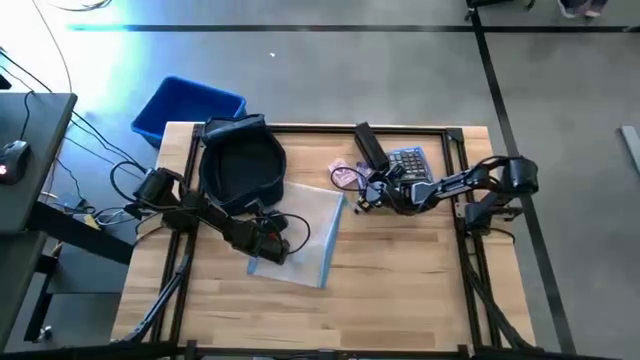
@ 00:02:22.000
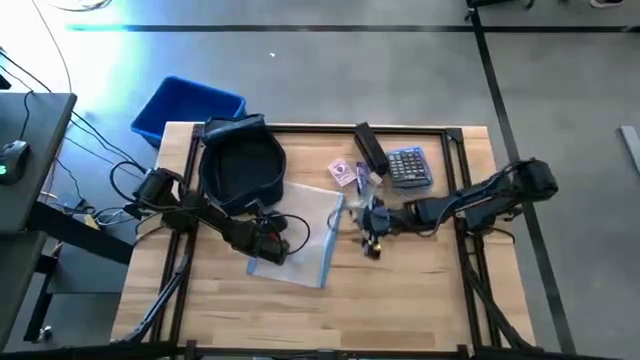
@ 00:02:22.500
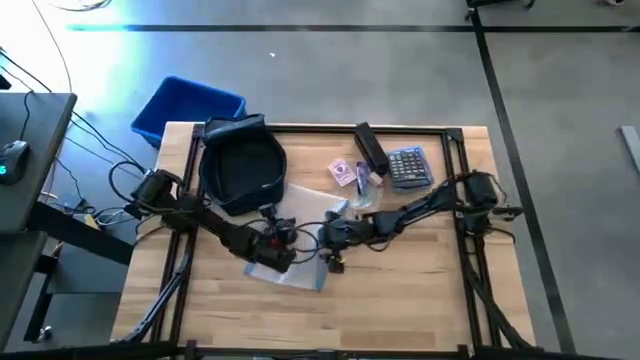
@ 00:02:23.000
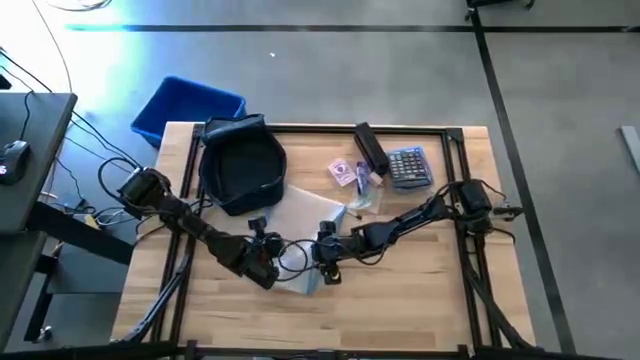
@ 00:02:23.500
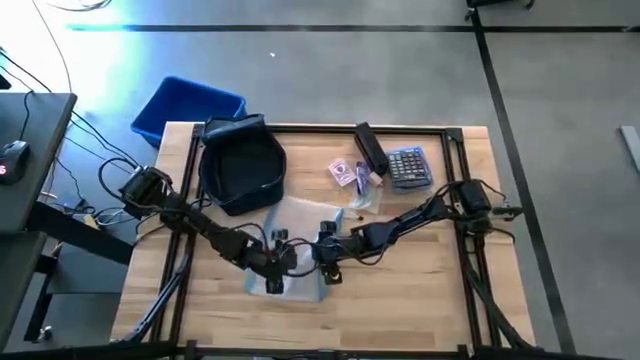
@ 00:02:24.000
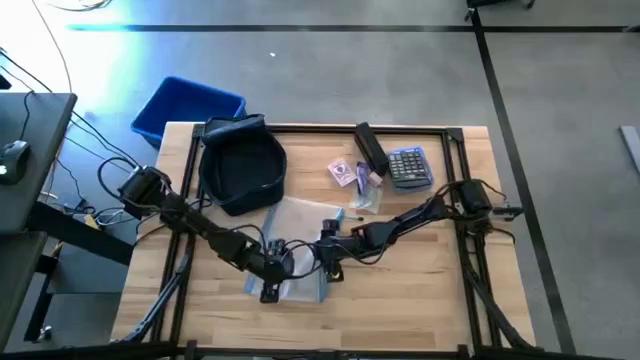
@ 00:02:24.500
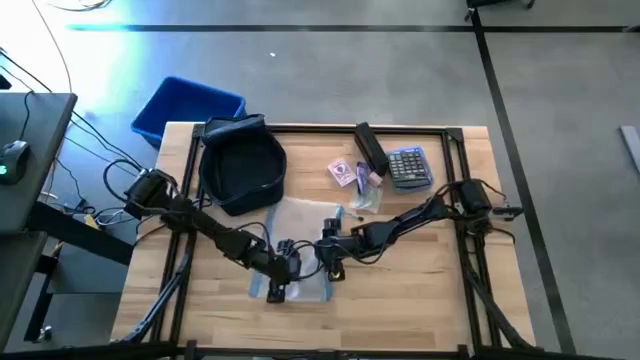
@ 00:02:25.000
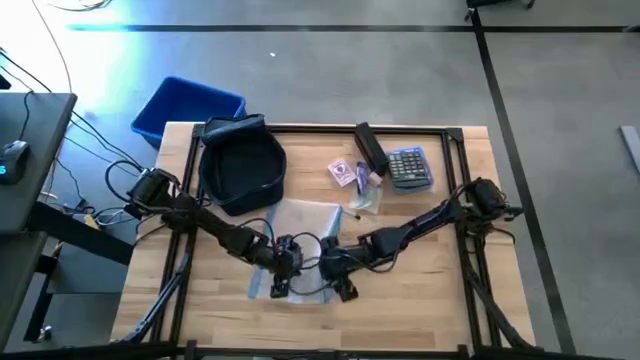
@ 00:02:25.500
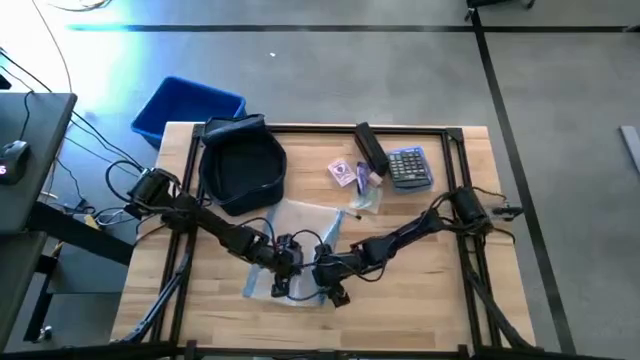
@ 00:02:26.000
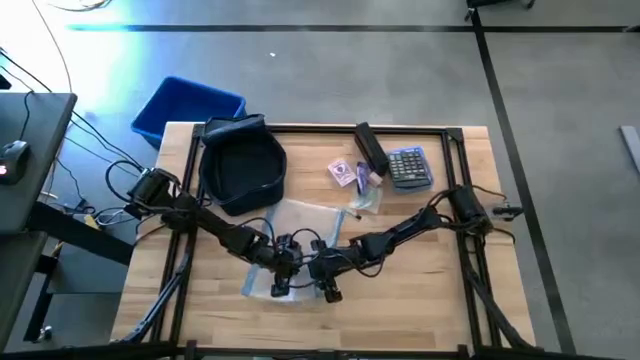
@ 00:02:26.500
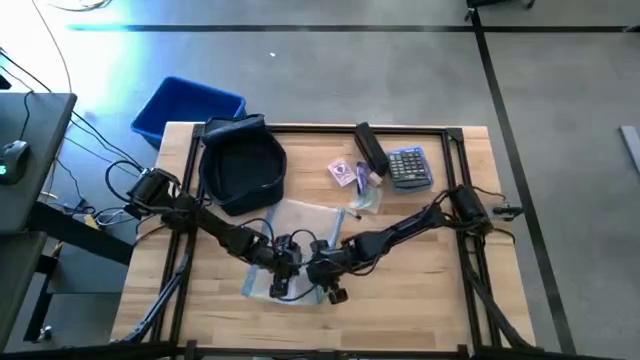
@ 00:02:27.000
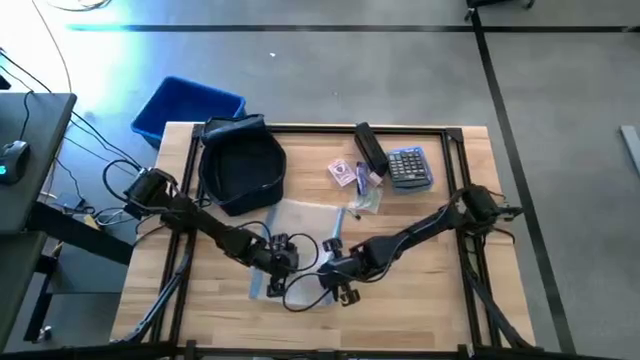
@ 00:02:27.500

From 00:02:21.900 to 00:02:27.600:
Task: Unpack backpack
Remove the white charger adapter from the white zip bag

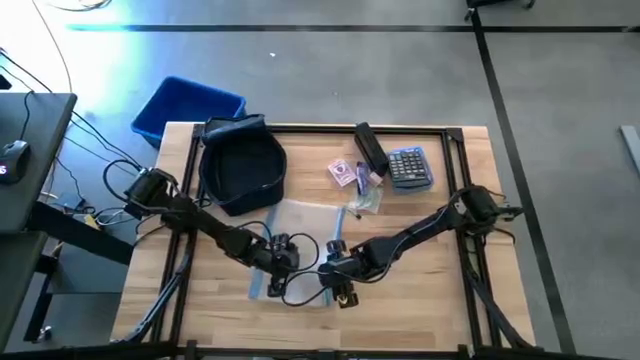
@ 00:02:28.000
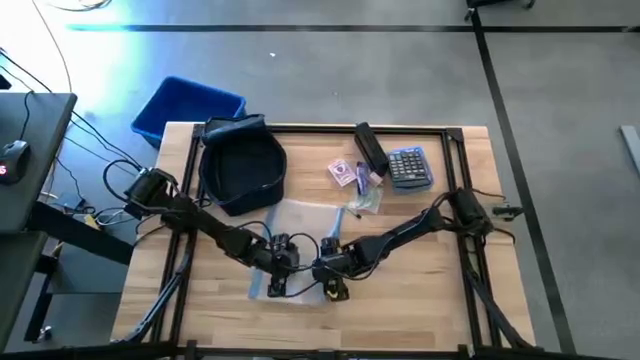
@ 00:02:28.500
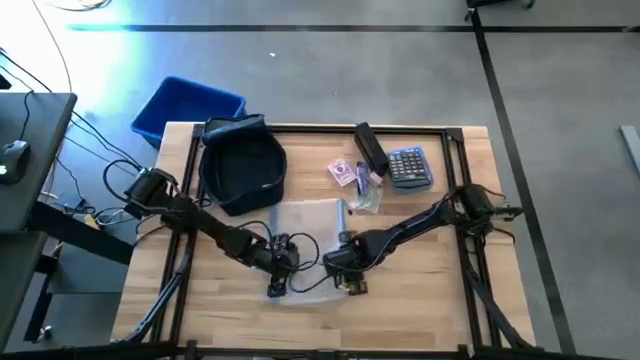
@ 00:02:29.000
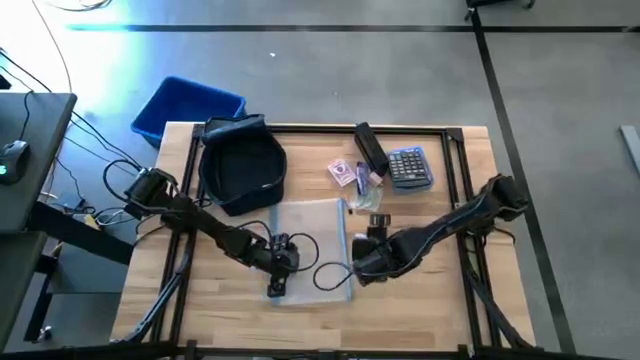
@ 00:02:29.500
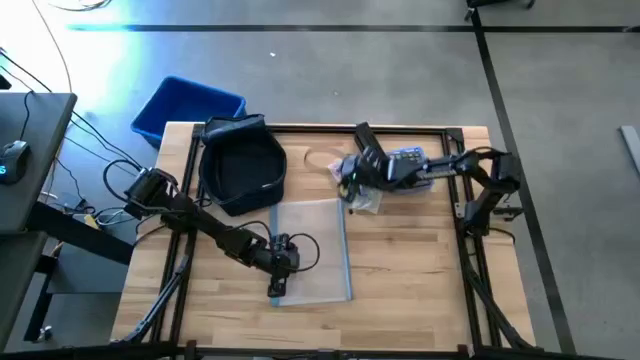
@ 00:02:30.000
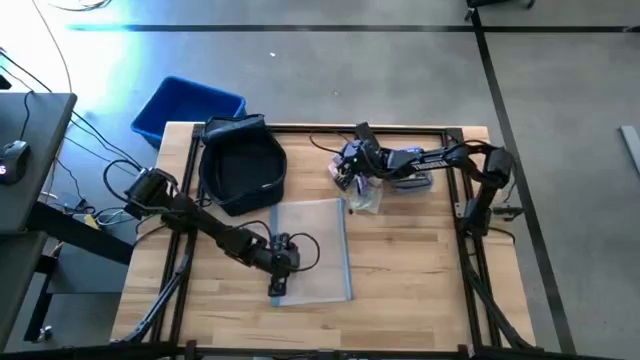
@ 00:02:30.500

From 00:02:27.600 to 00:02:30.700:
Remove the blue charger adapter from the white zip bag

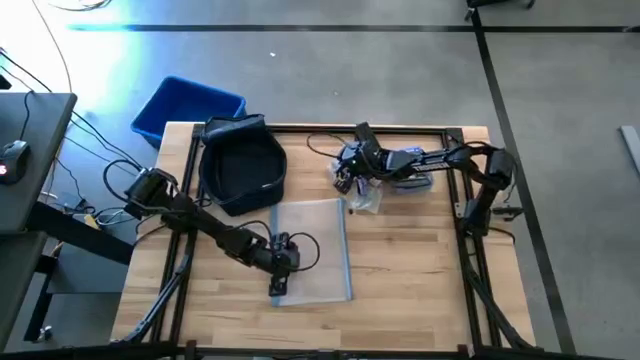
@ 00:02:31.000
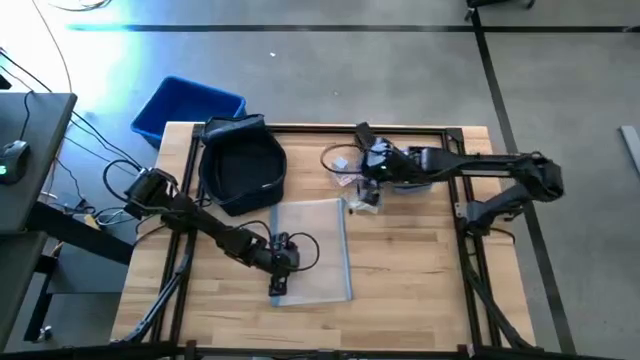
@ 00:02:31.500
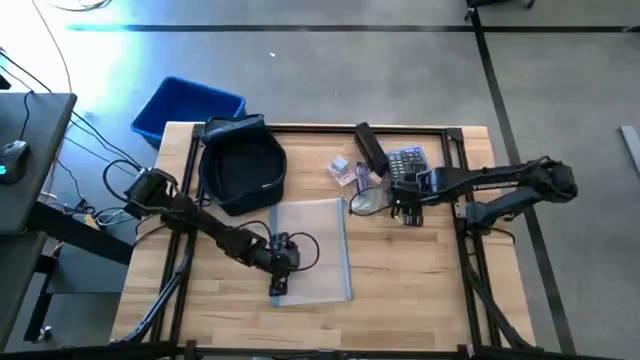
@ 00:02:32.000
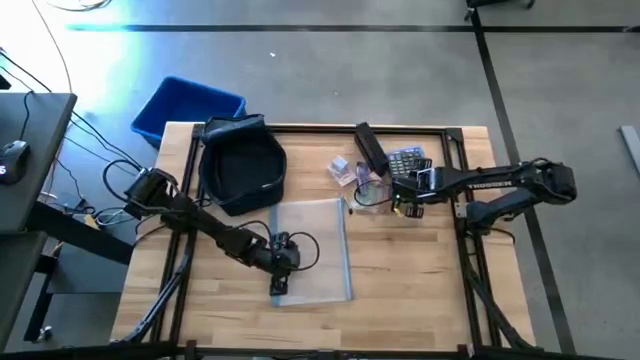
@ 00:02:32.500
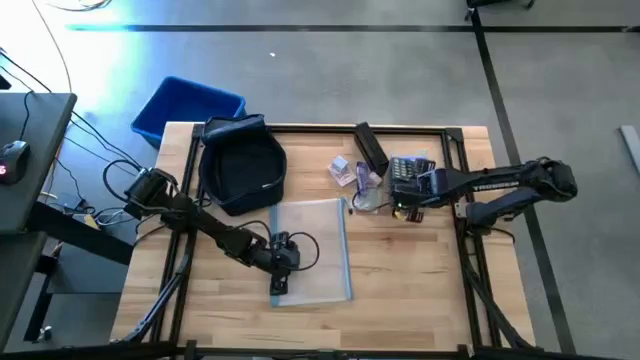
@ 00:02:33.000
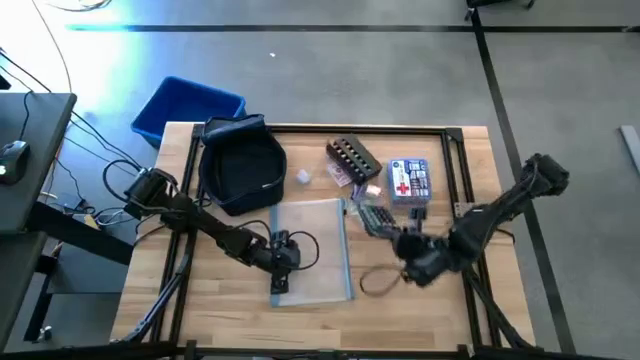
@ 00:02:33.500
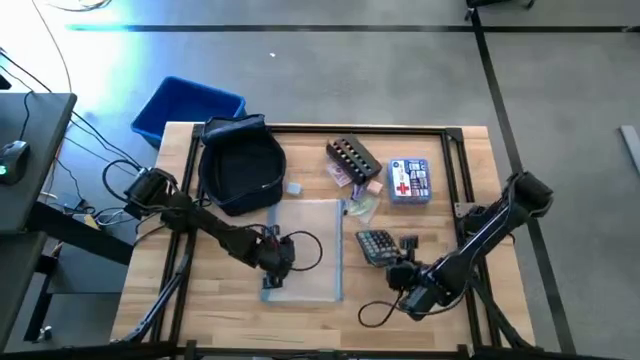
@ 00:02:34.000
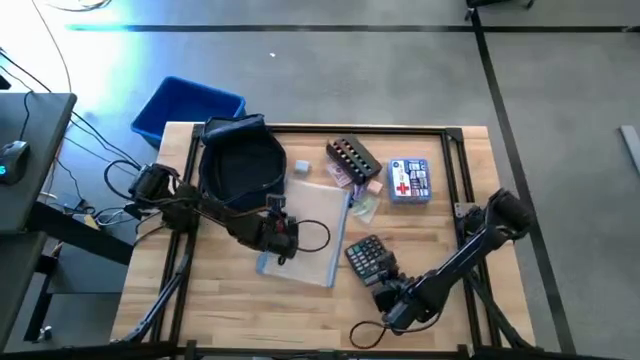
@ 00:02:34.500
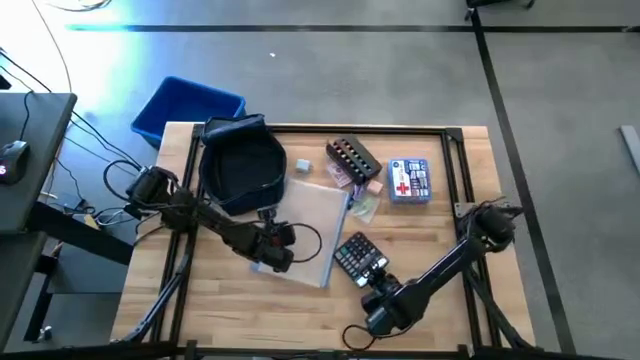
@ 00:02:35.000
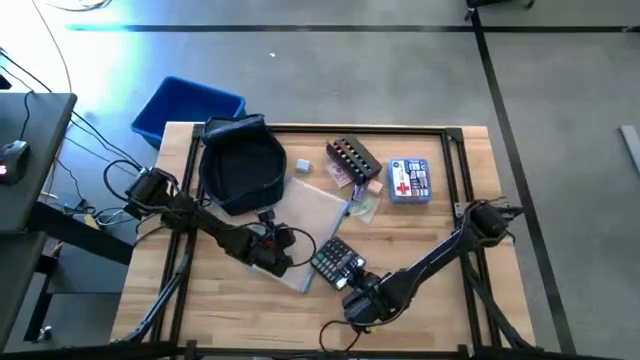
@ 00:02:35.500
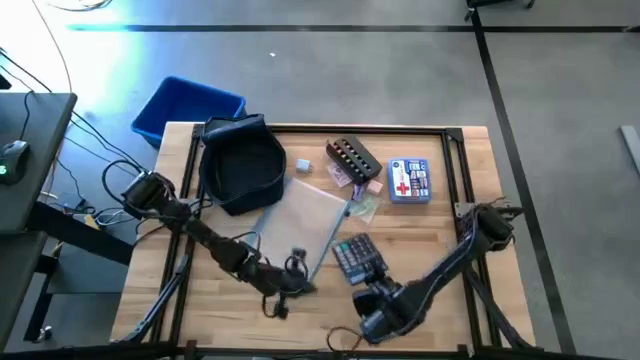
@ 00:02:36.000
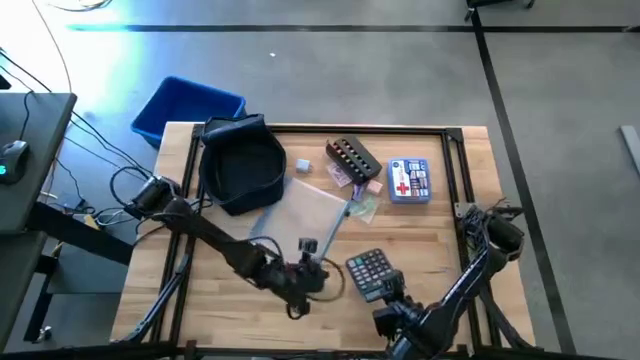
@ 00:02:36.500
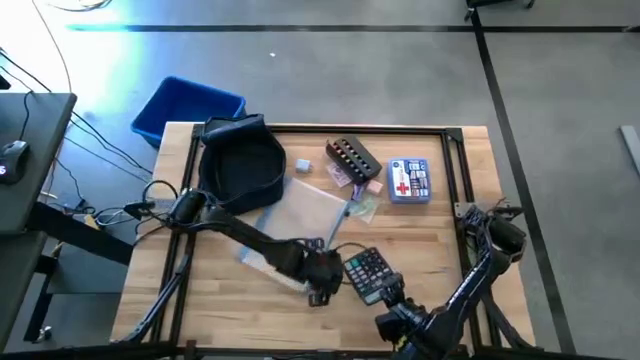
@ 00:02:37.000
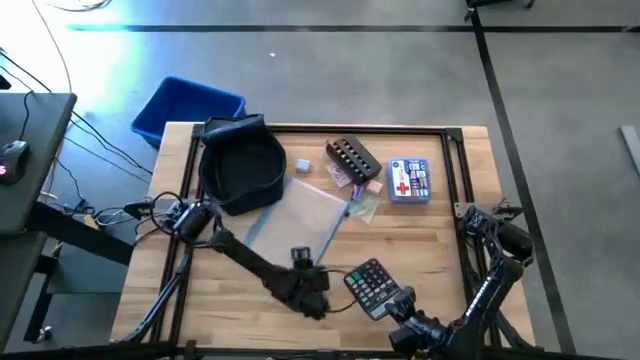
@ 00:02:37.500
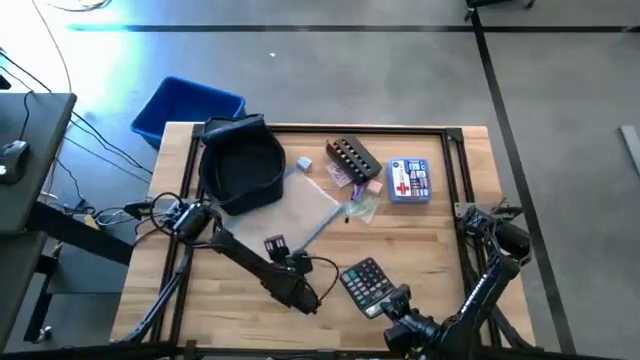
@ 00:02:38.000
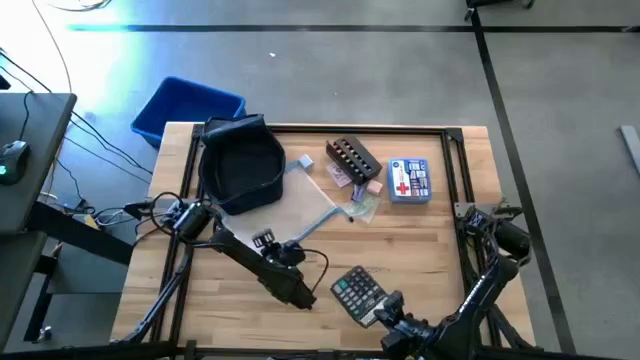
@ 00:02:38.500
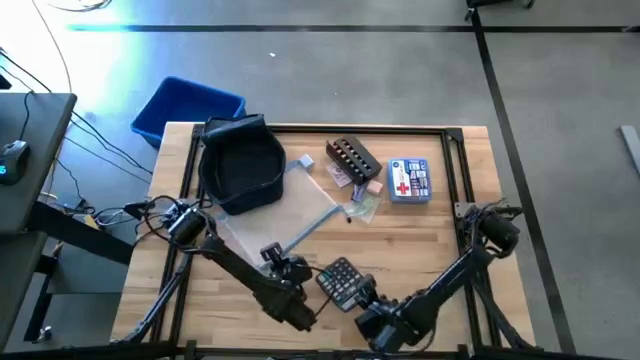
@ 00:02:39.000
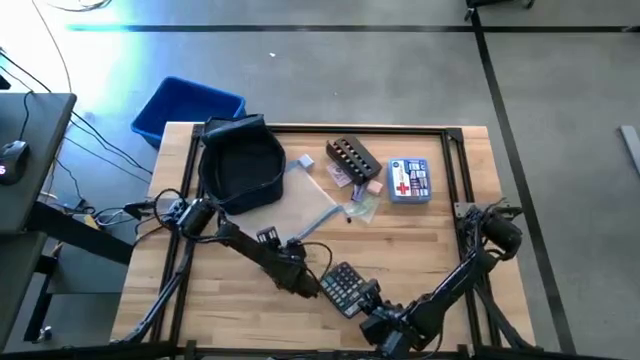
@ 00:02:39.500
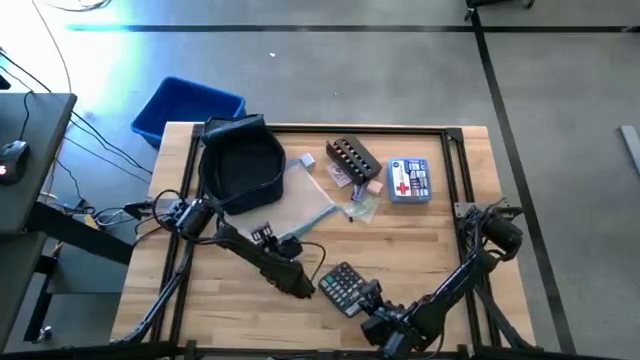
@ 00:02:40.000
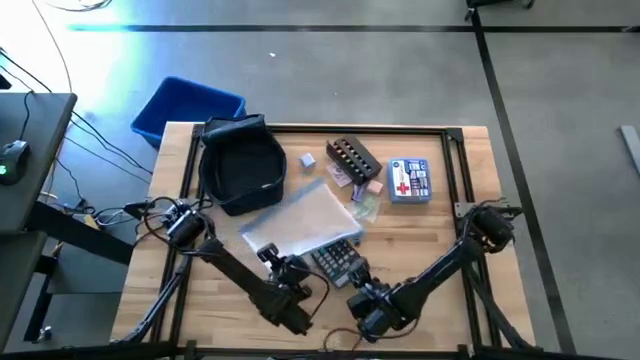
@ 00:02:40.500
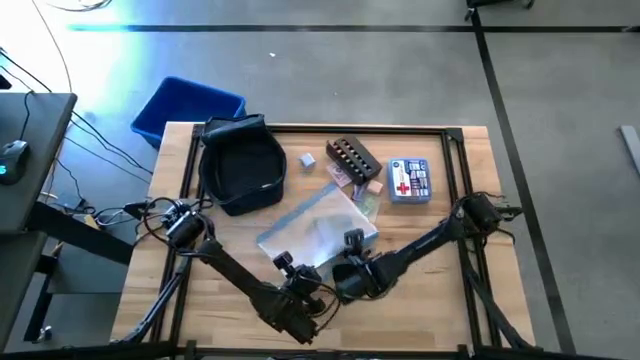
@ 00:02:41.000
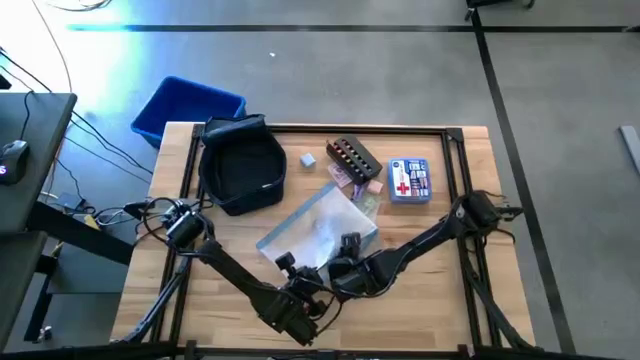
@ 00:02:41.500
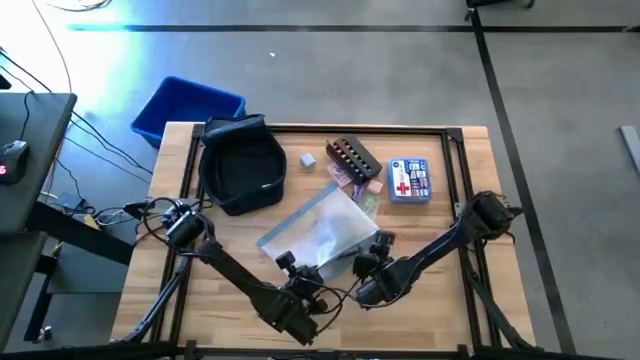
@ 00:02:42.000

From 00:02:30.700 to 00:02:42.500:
Put the black calculator into the white zip bag

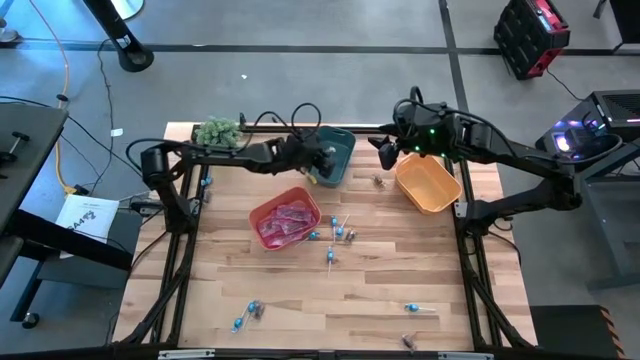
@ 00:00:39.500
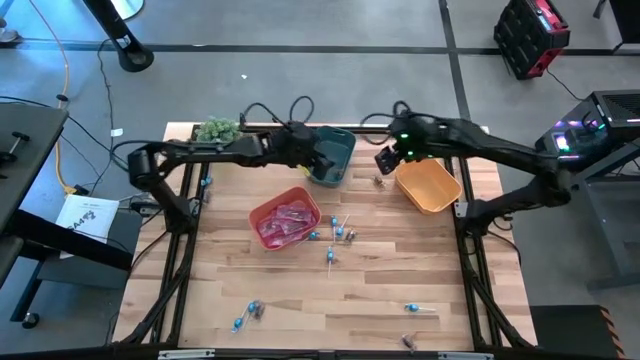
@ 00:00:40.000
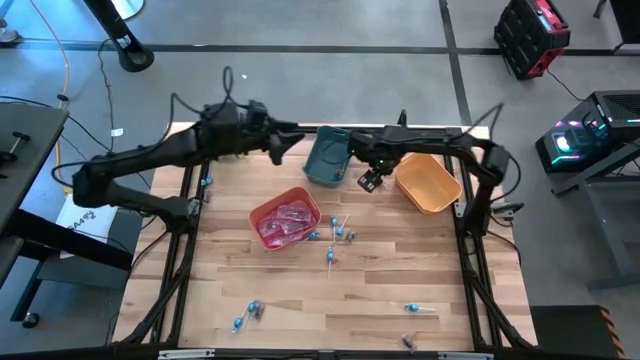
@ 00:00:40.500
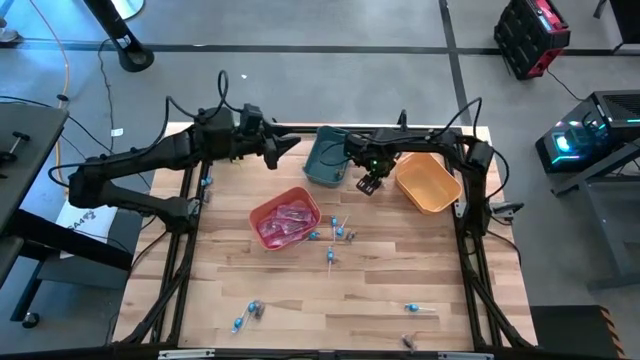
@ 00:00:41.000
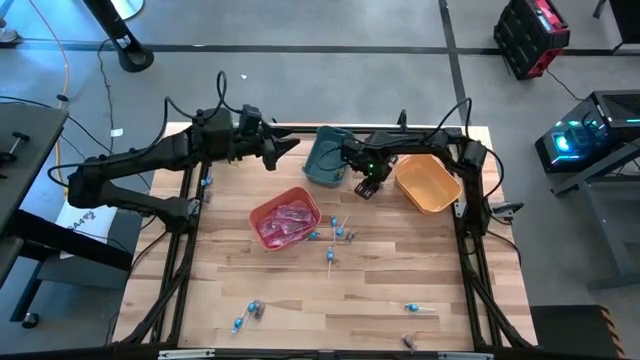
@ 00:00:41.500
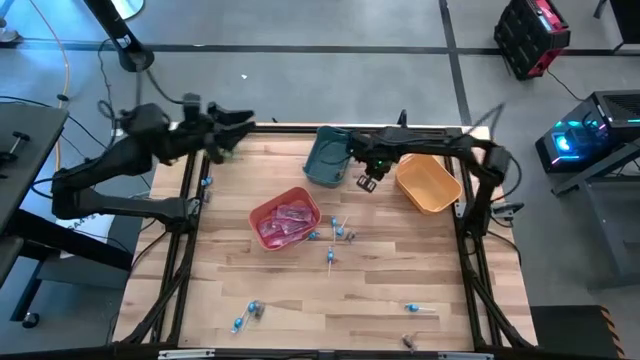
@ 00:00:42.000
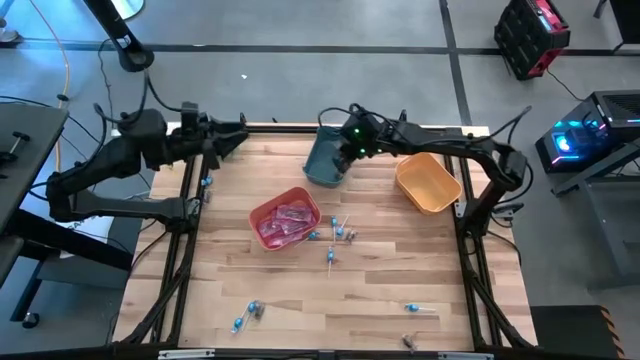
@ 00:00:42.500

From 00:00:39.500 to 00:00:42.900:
Task: Sort candy
Put the black candy into the blue bin
